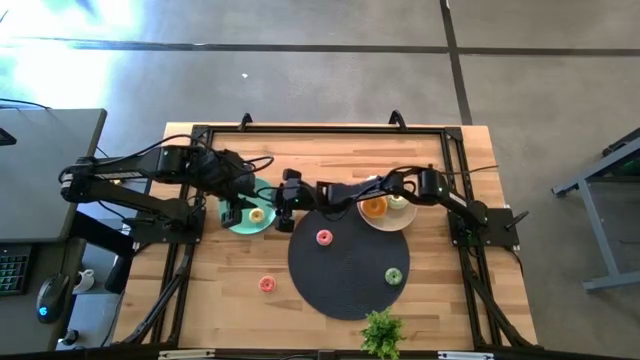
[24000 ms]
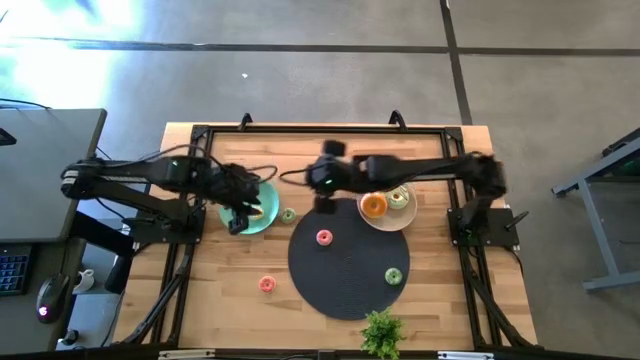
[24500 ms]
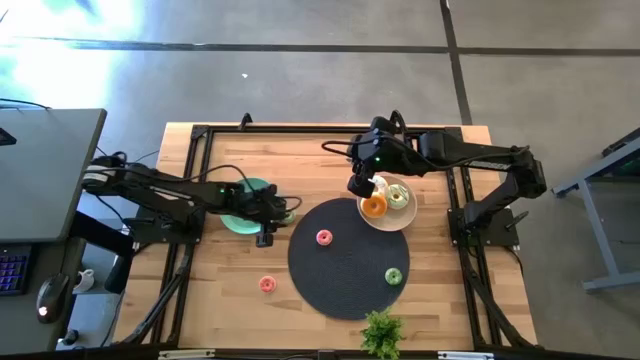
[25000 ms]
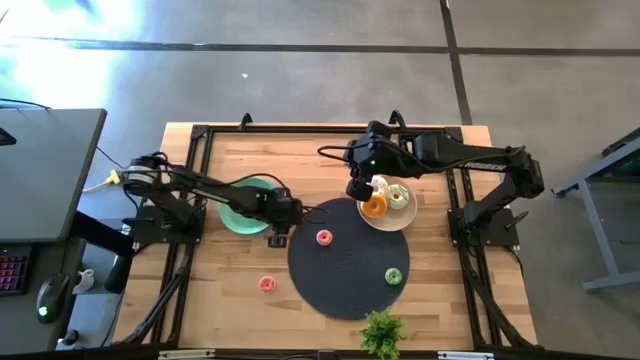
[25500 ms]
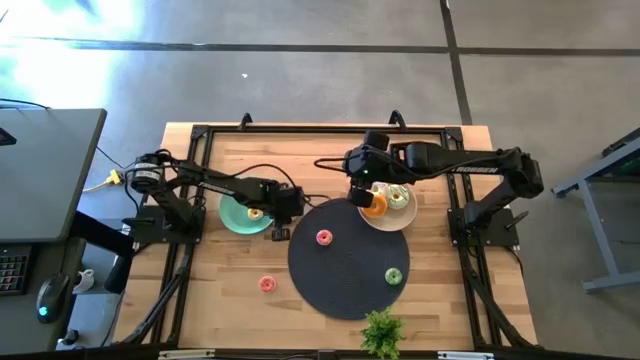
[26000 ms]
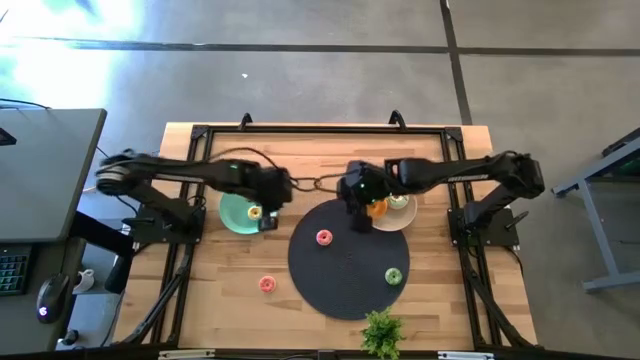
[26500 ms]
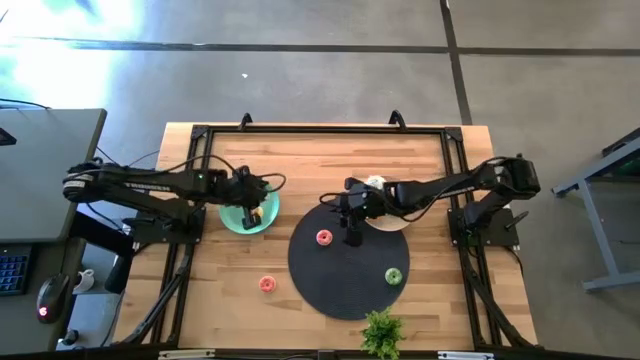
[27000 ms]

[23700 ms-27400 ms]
Task: Pick & Place donuts
Put the top small green donut on the light green plate

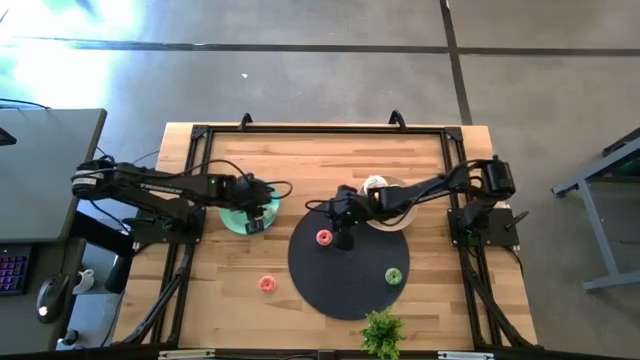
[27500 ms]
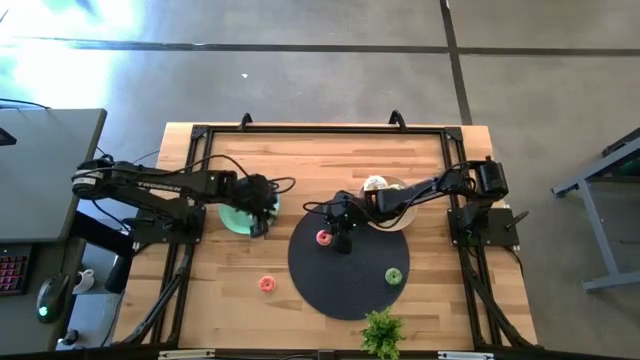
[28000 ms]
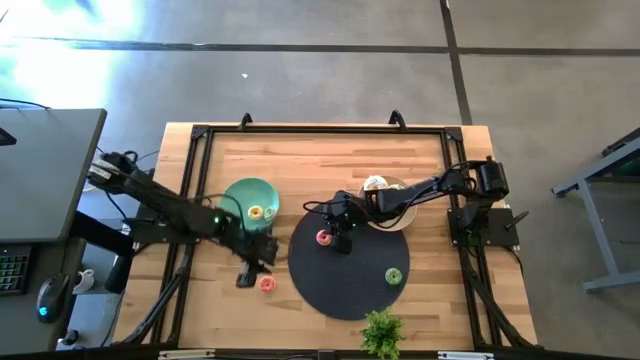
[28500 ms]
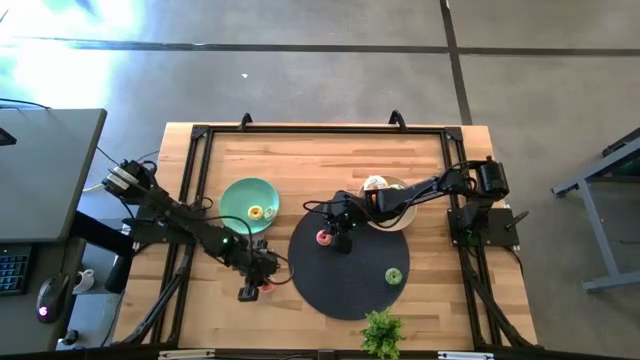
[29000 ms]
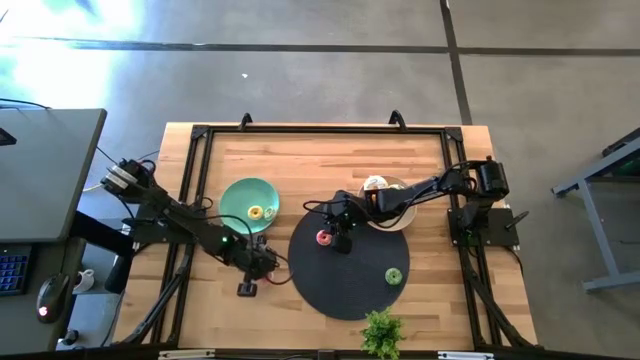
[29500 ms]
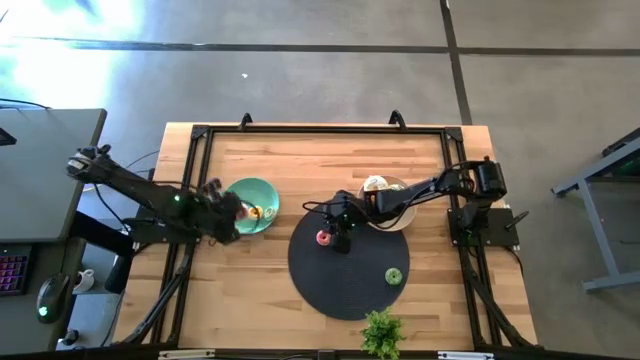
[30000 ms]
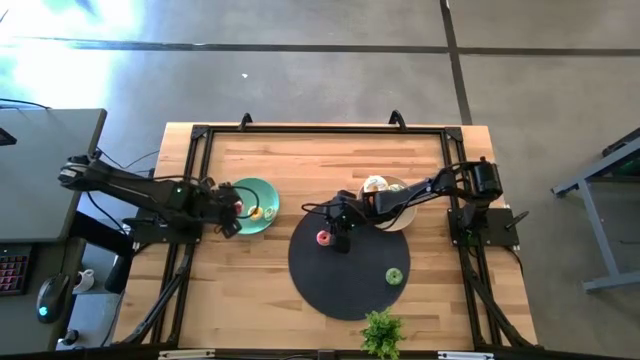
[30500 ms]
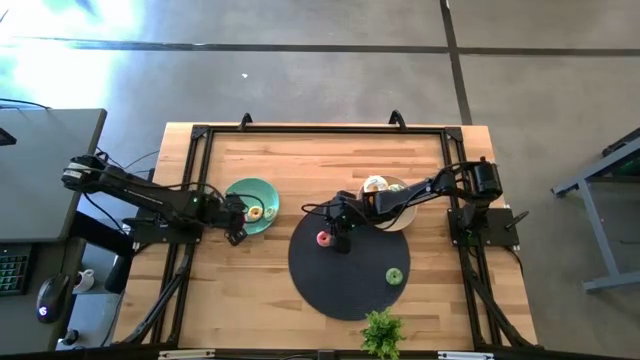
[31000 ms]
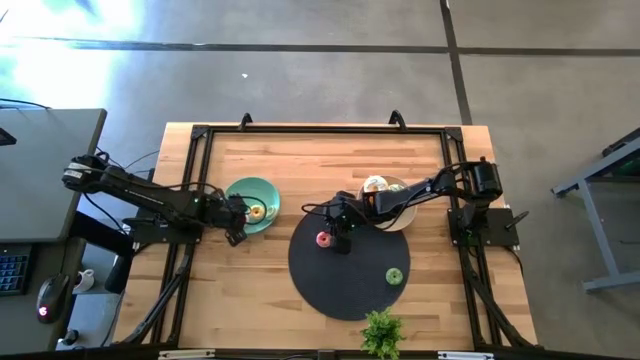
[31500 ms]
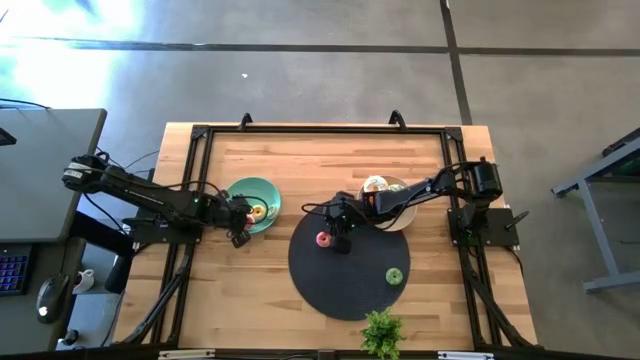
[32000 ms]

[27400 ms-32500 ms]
Put the bottom small pink donut on the light green plate

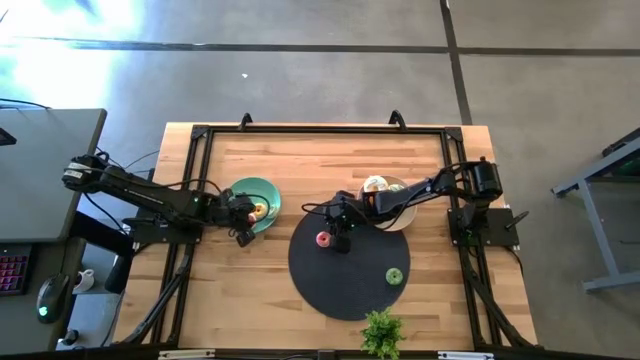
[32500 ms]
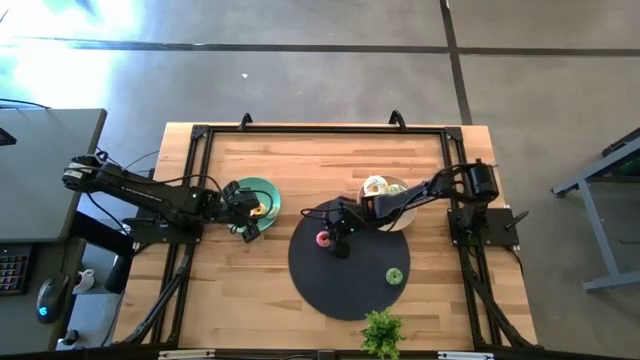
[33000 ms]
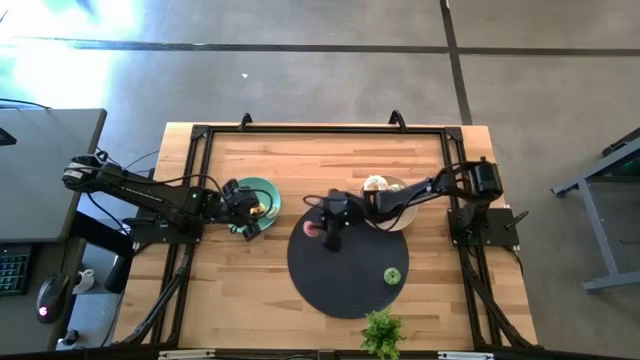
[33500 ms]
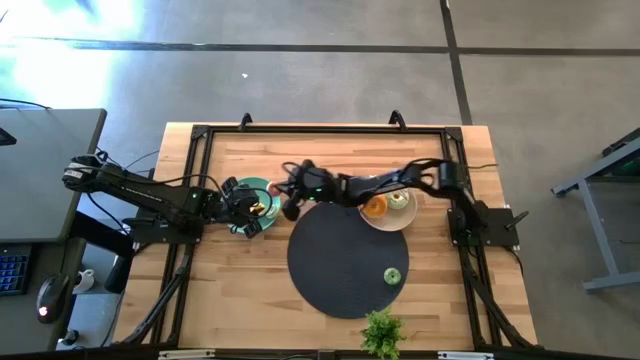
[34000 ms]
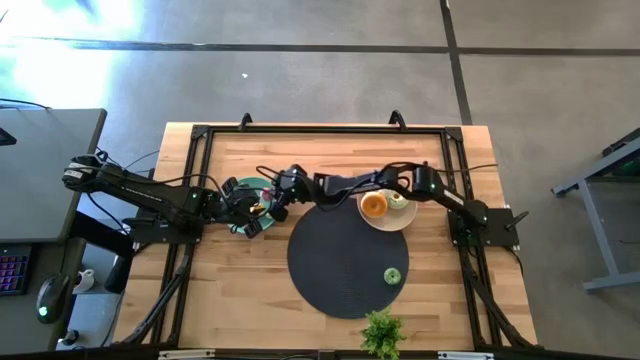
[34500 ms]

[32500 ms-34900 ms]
Put the small pink donut on the light green plate

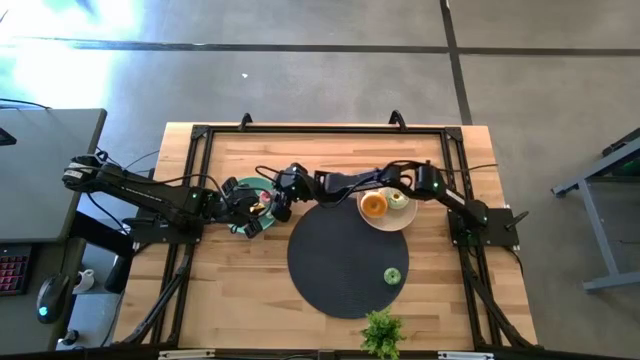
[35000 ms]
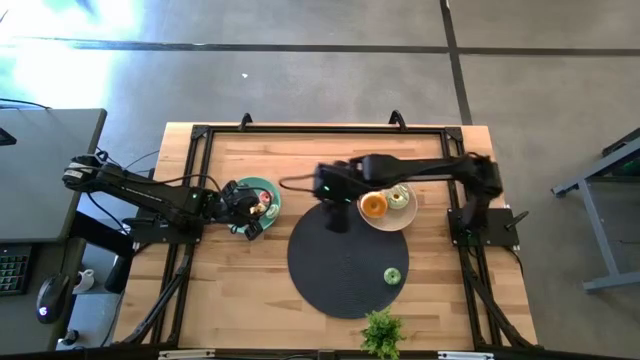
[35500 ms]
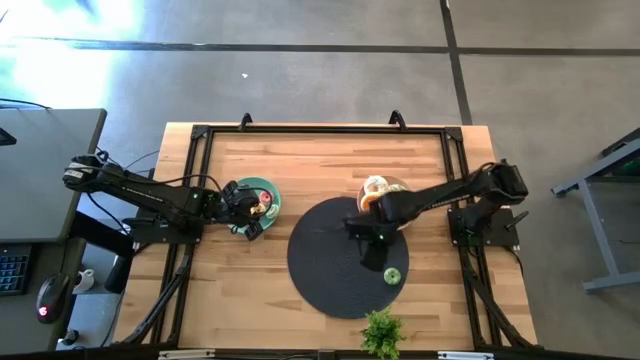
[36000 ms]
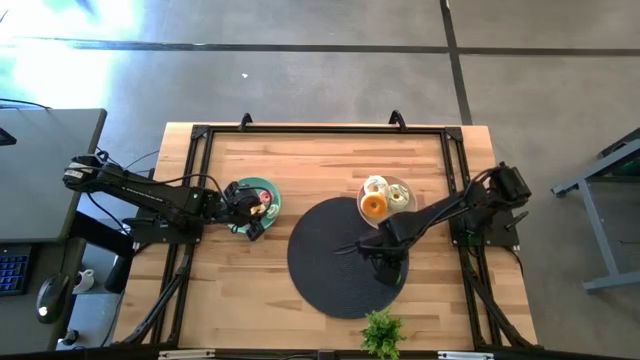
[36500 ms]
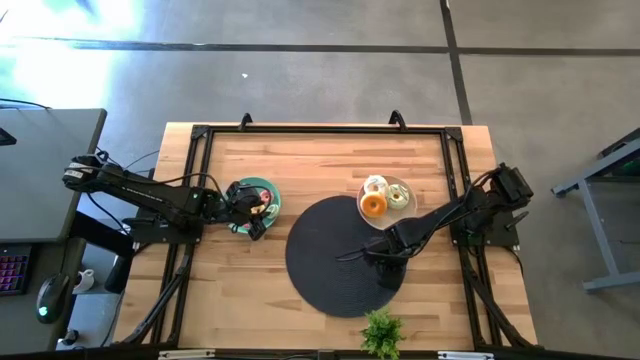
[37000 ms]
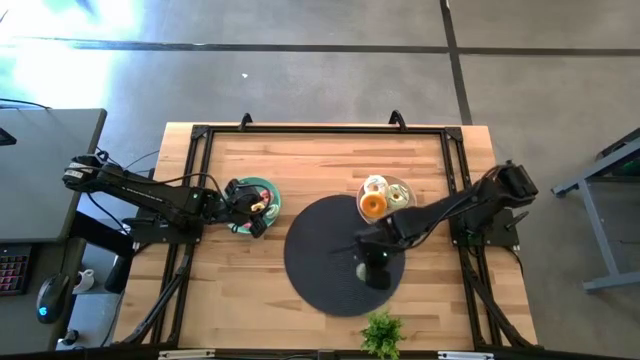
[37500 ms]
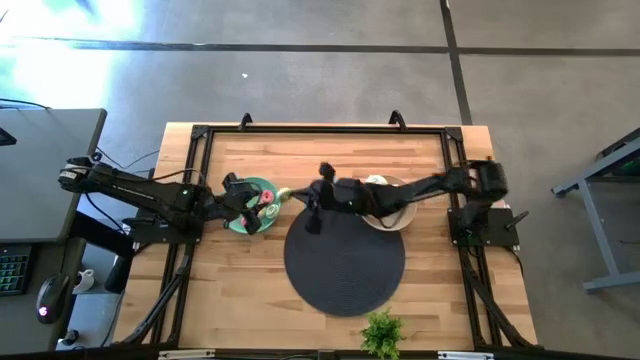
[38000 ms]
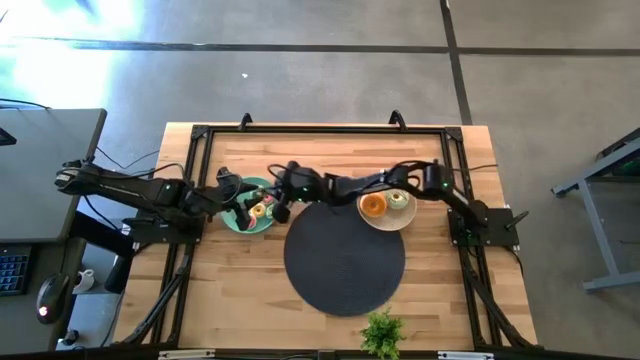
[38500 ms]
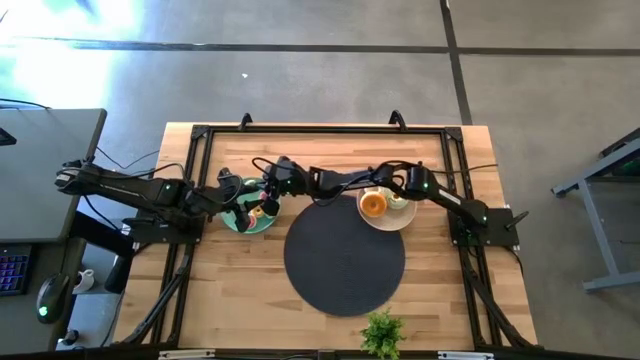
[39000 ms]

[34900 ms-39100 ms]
Put the small green donut on the light green plate

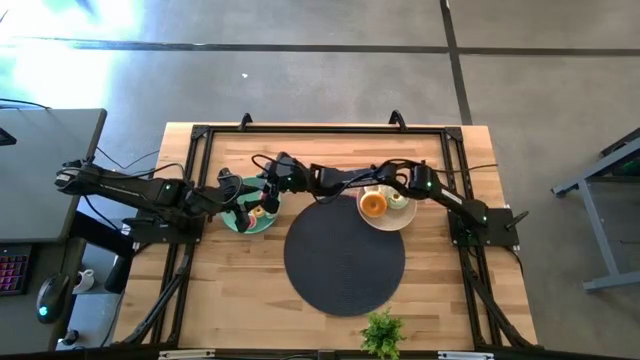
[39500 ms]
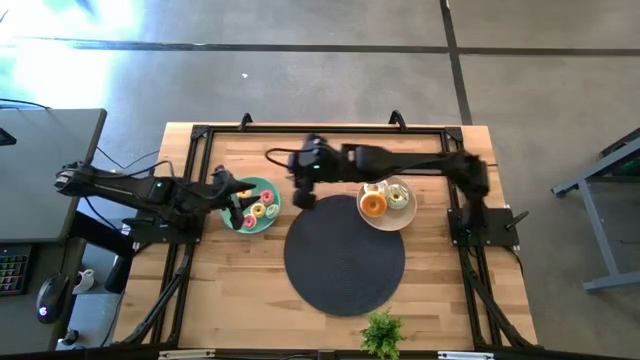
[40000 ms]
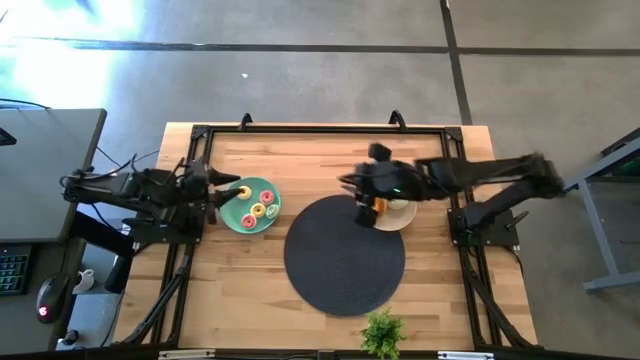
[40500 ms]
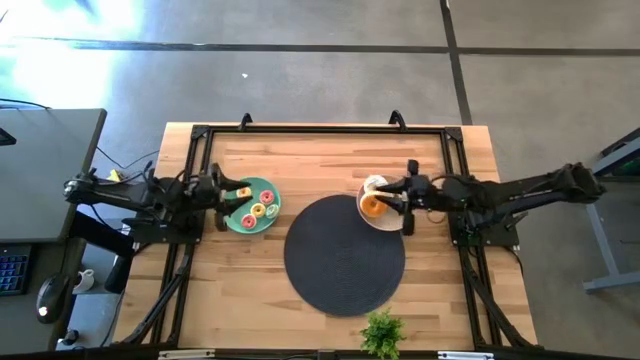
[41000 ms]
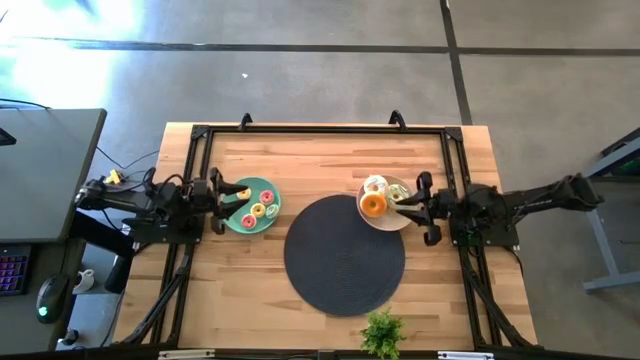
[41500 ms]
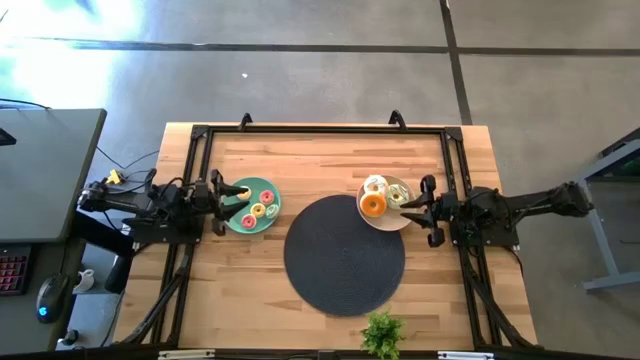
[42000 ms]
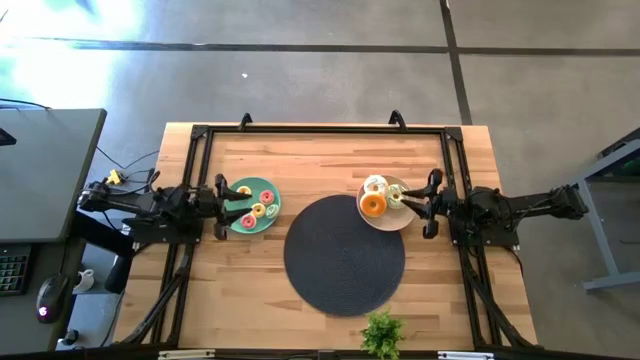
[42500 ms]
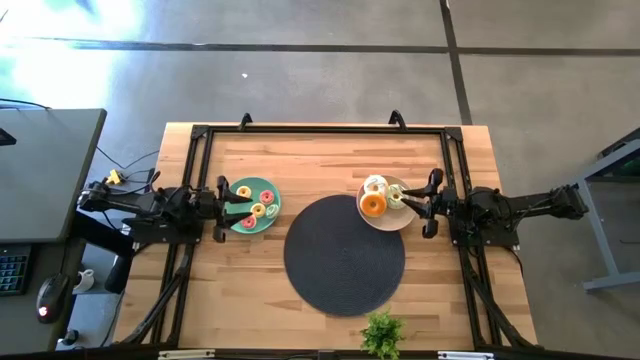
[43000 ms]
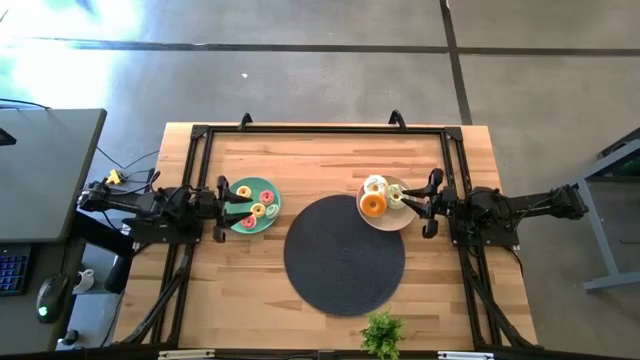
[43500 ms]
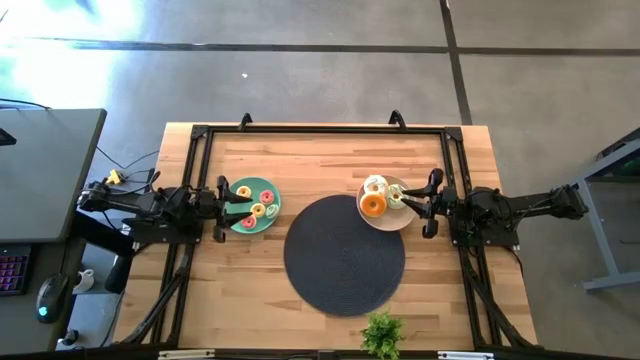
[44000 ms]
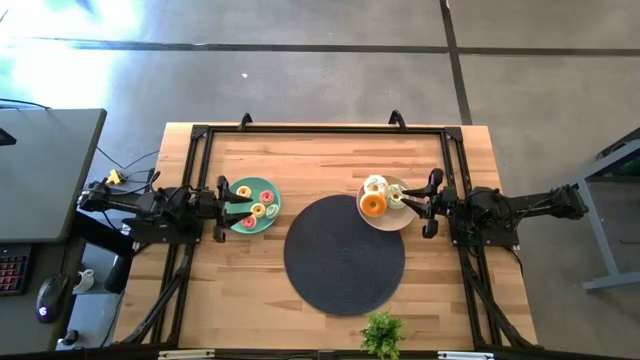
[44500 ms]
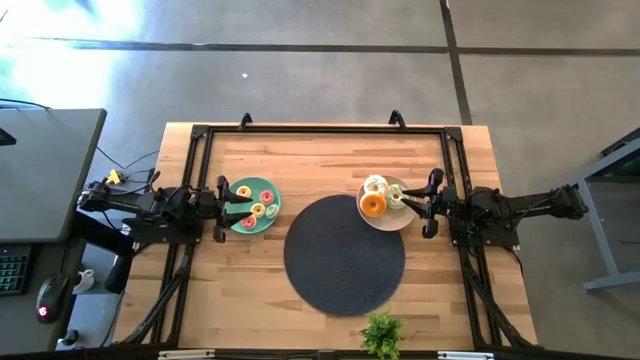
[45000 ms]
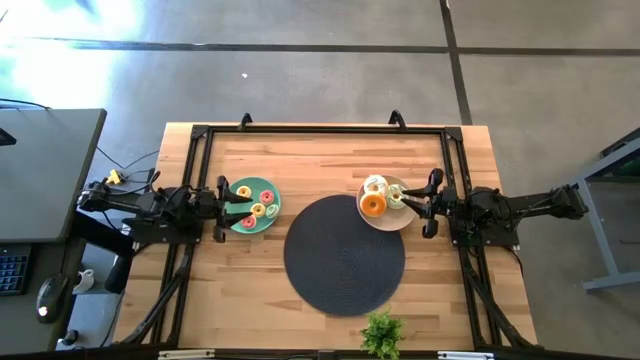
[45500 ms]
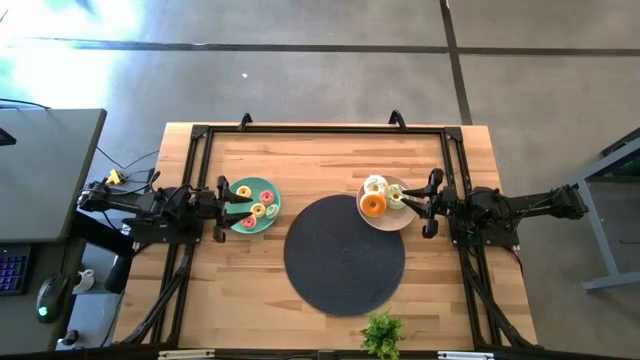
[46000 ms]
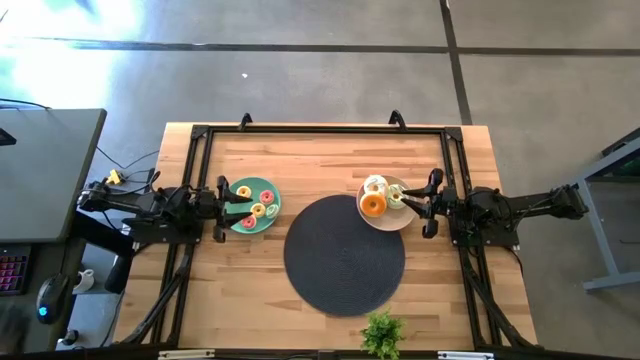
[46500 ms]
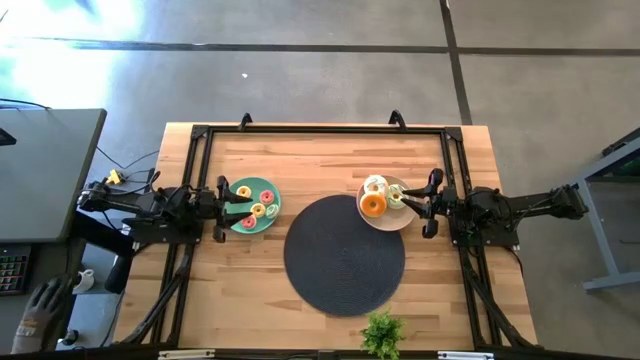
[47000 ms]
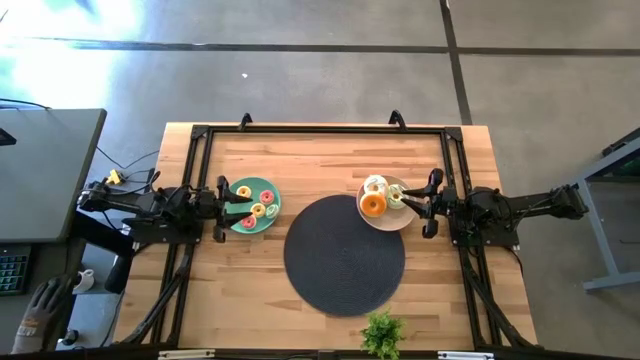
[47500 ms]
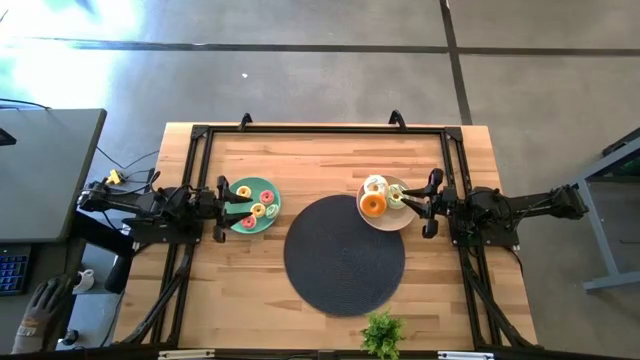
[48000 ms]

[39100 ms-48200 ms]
Return to Home Position
